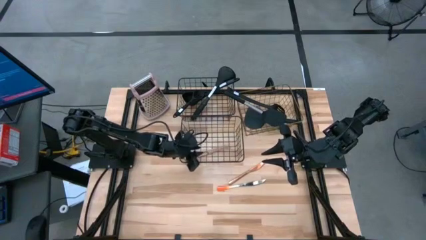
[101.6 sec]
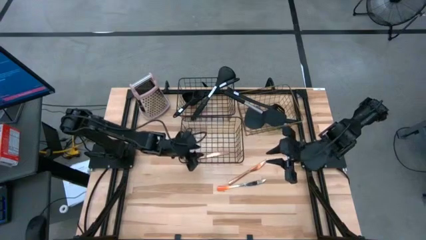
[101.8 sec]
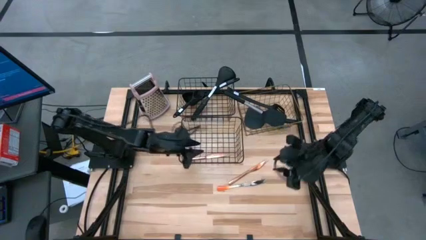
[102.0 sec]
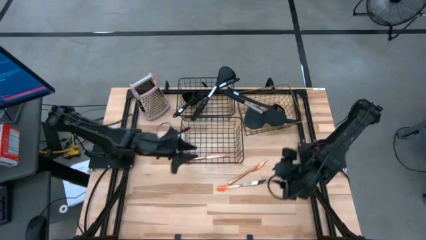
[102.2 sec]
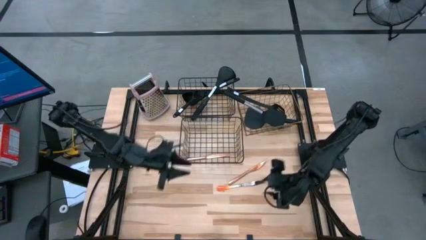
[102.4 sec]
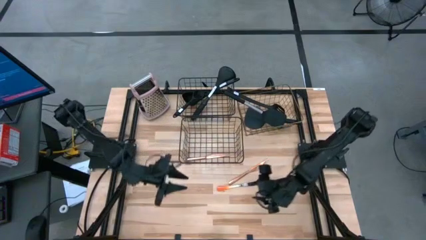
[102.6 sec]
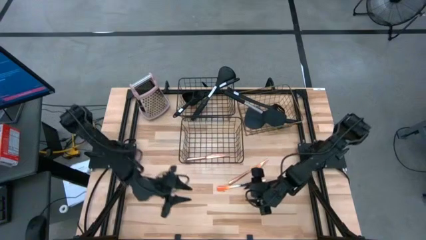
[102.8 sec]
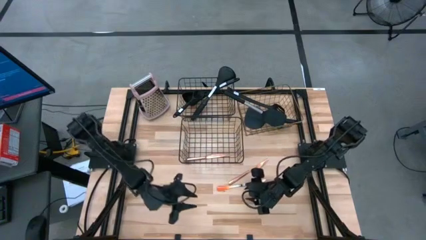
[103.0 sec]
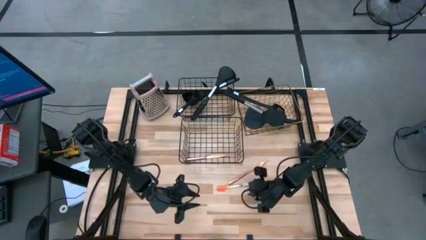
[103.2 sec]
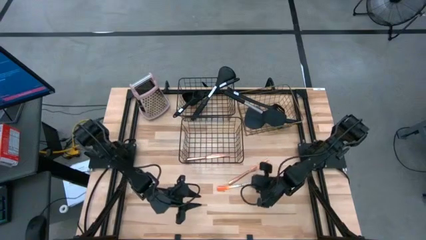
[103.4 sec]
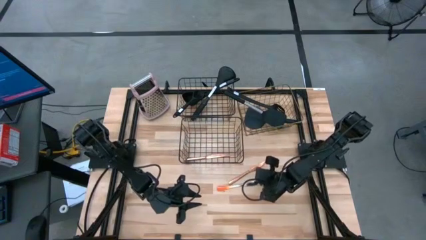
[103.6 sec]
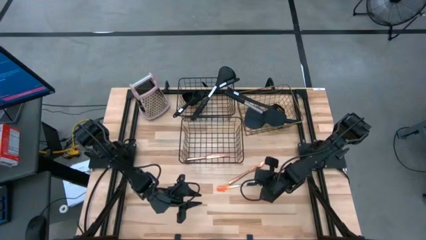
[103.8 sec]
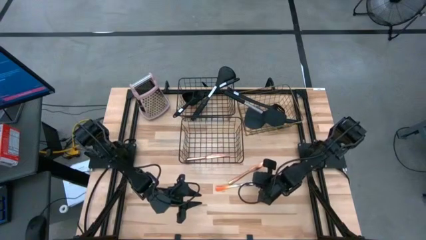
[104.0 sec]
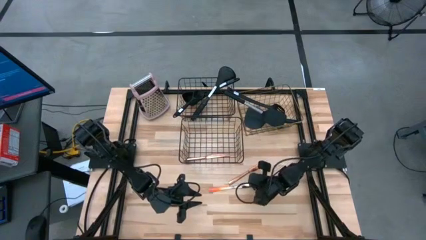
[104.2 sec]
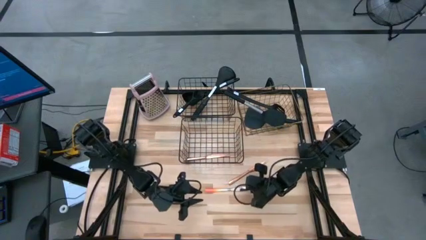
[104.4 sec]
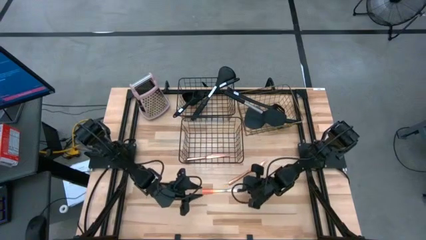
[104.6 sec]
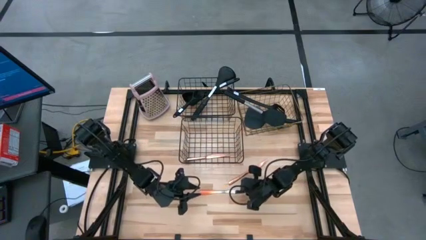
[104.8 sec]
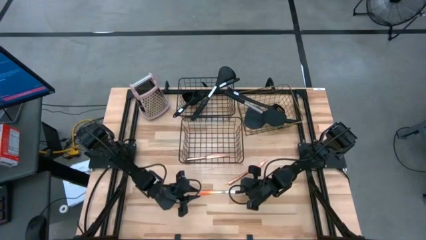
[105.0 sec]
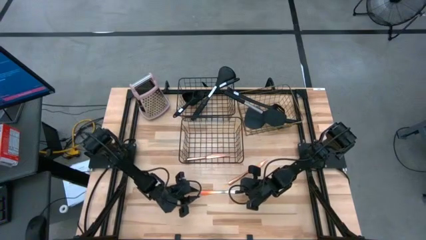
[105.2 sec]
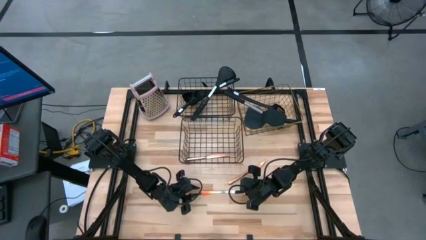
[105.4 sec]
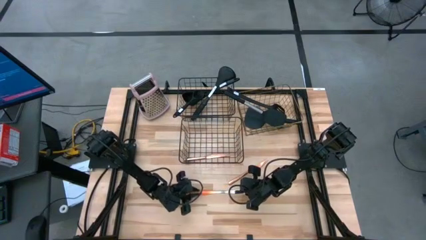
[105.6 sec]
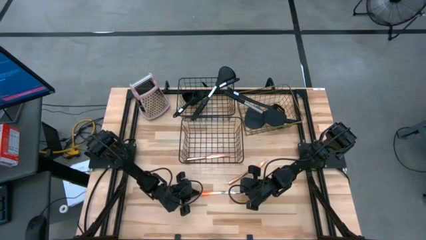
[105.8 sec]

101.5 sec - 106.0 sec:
Task: Pick & Place Kitchen Items
Put the table knife into the bottom wire basket

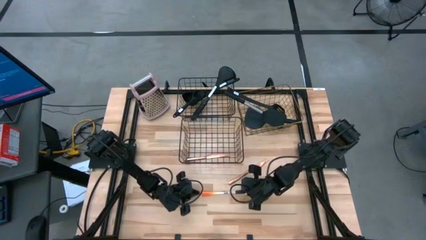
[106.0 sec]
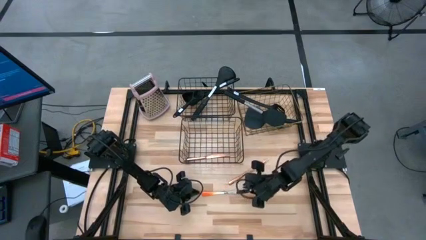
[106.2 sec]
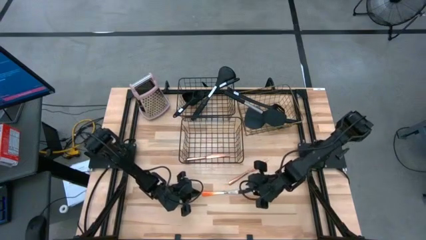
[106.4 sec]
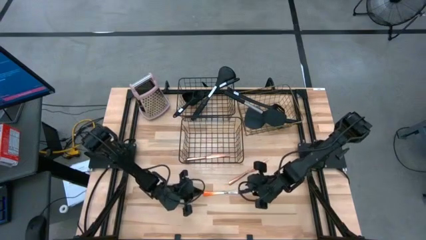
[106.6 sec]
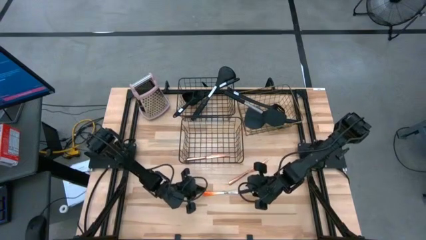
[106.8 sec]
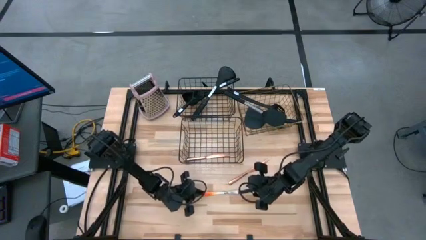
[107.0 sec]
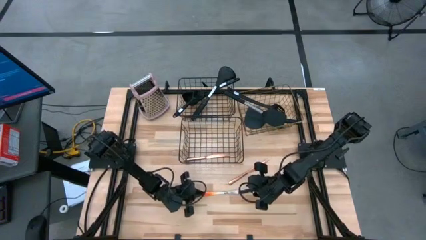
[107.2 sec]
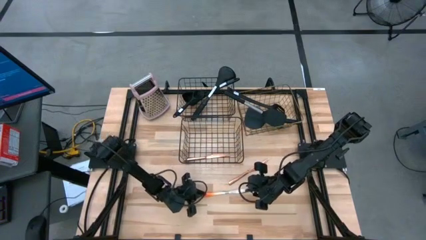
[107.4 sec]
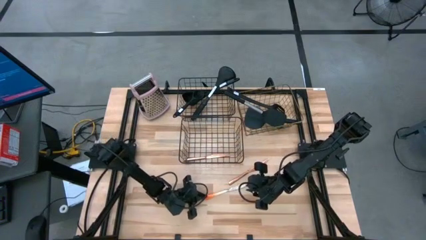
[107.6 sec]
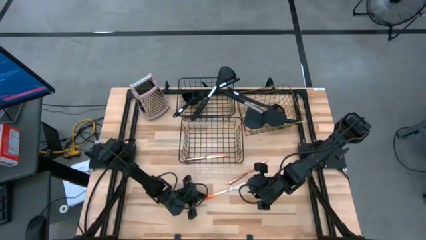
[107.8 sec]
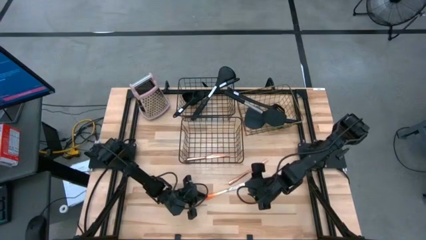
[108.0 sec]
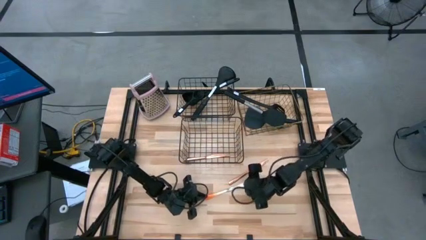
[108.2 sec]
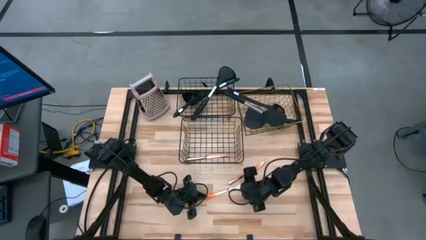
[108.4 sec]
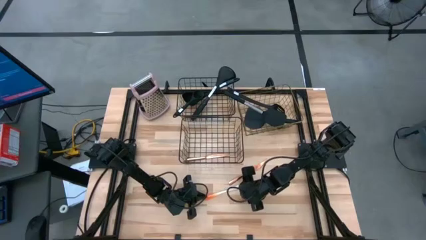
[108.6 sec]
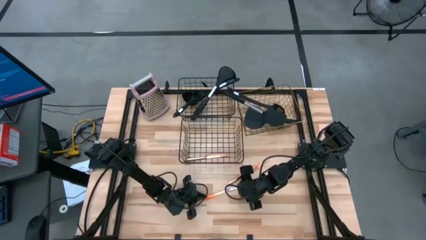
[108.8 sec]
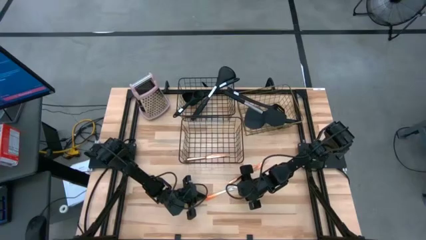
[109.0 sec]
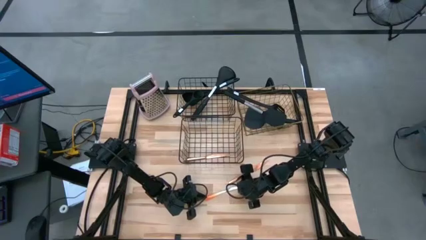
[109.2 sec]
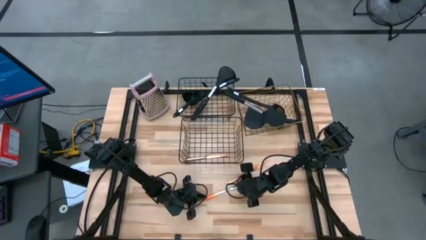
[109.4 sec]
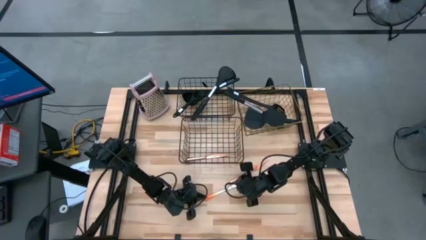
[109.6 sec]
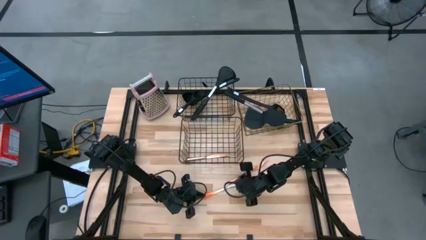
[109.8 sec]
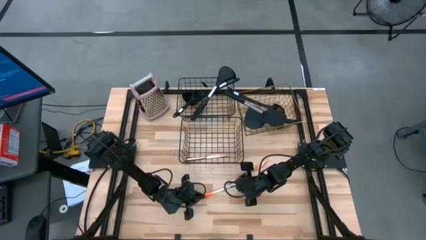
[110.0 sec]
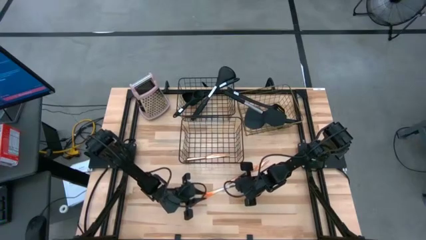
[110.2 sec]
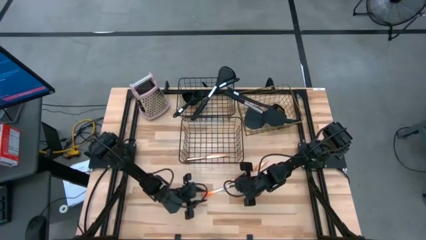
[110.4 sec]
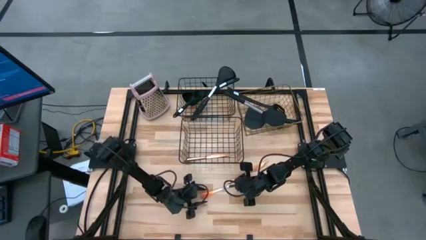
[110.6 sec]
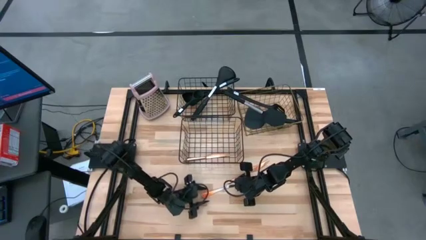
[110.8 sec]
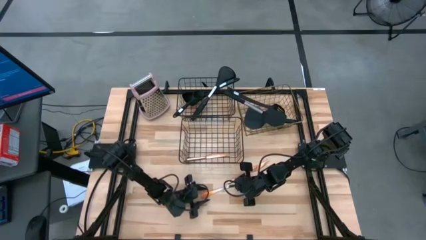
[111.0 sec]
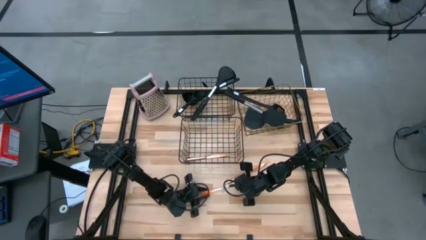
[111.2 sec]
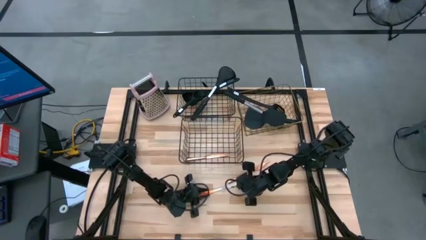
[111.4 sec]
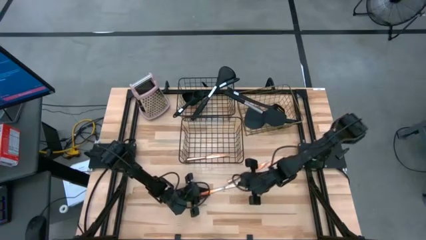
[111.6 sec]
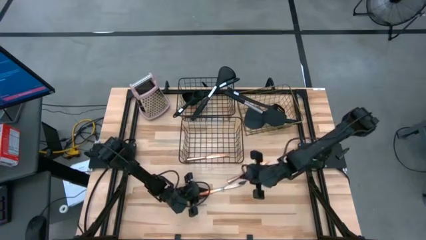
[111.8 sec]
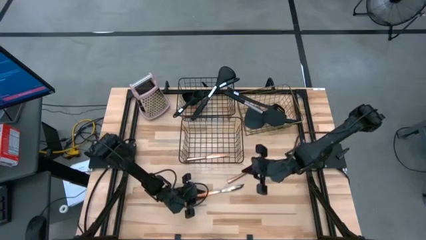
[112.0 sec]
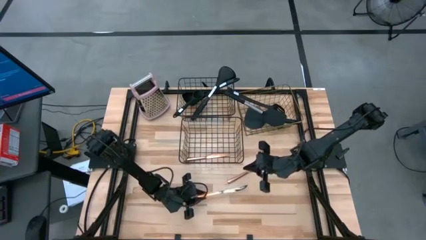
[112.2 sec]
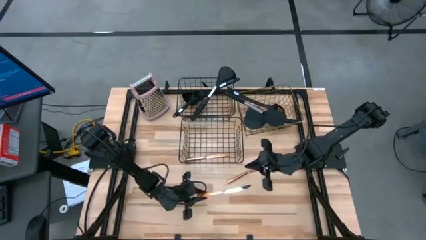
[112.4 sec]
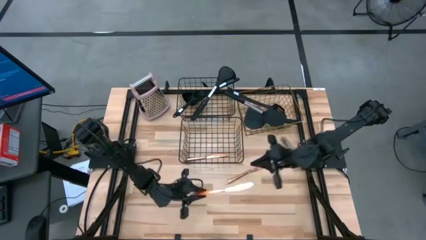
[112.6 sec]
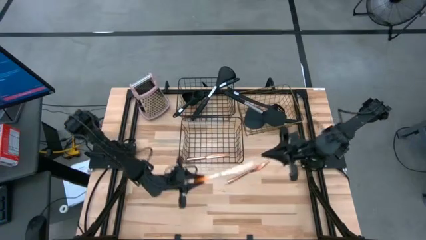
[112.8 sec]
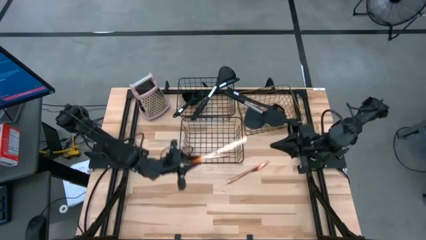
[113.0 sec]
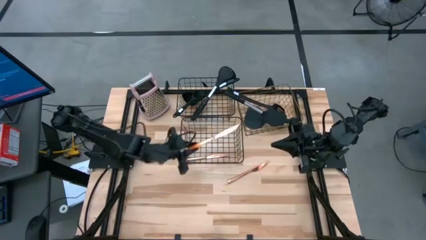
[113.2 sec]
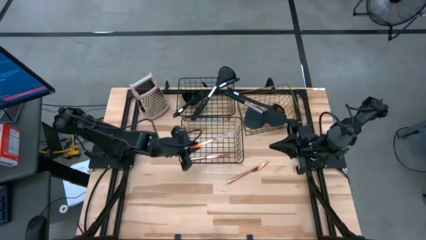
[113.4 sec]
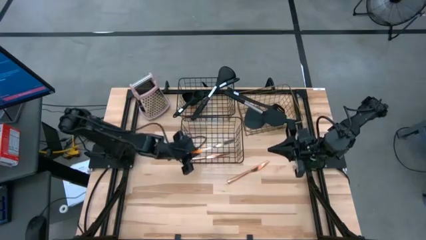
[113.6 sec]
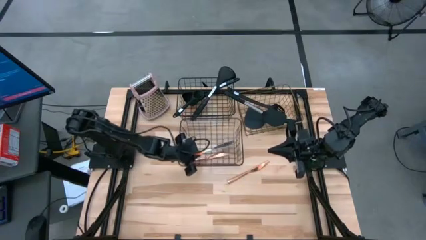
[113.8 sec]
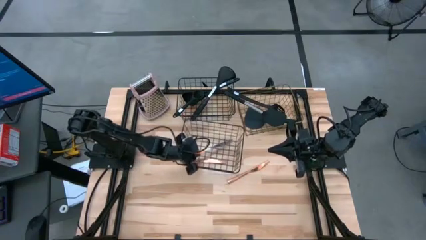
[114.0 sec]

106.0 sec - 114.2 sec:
Put the table knife into the bottom wire basket

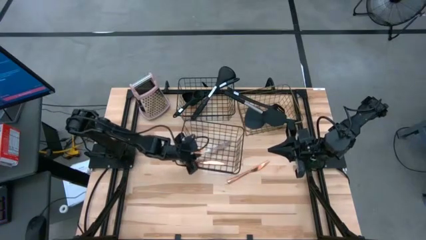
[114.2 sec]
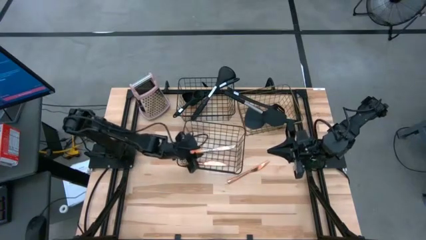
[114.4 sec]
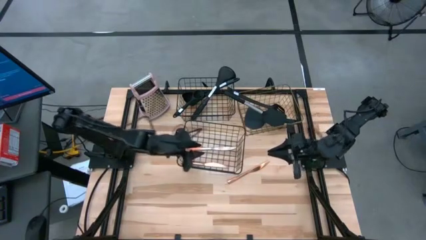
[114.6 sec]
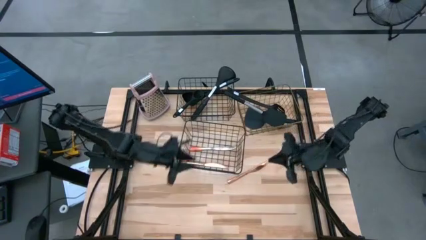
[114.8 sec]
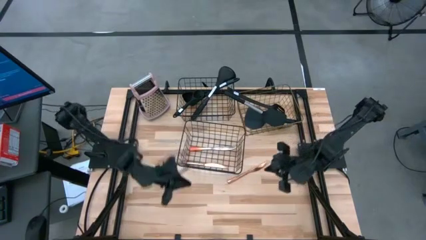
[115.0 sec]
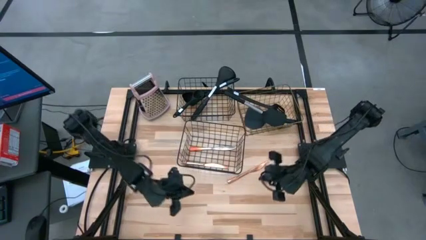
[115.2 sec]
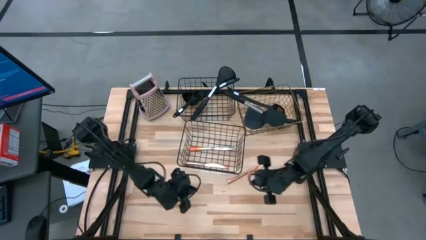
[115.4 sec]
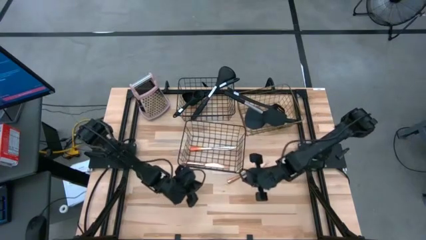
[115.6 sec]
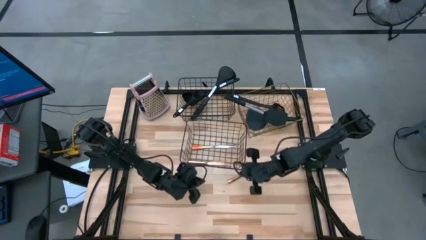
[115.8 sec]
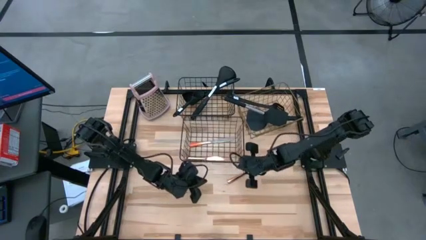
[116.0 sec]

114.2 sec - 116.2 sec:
Adjust the bottom wire basket on the table

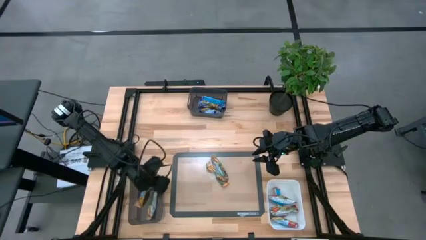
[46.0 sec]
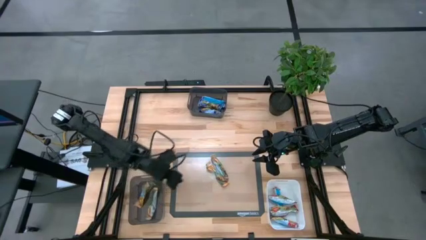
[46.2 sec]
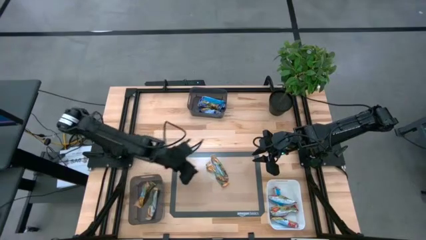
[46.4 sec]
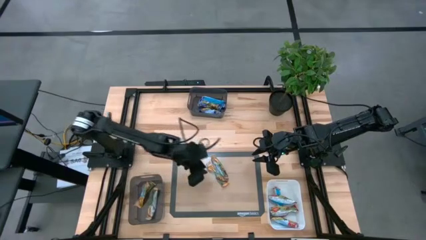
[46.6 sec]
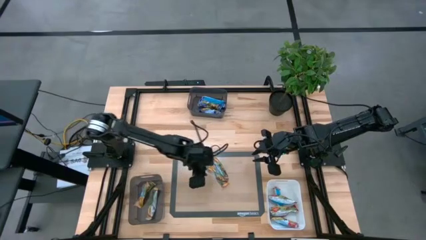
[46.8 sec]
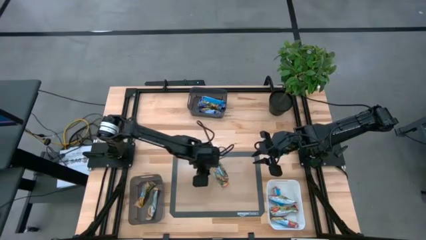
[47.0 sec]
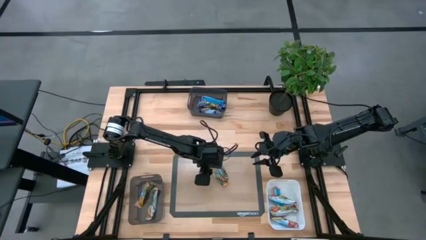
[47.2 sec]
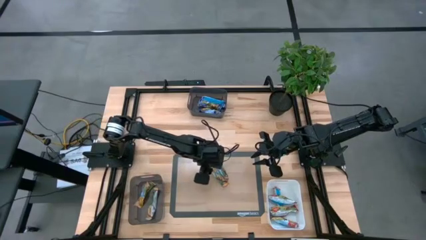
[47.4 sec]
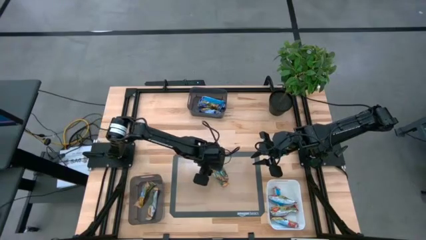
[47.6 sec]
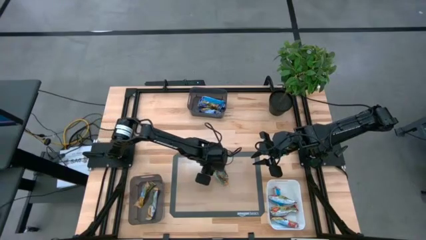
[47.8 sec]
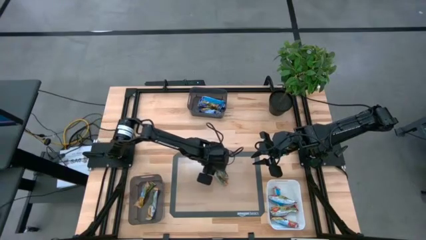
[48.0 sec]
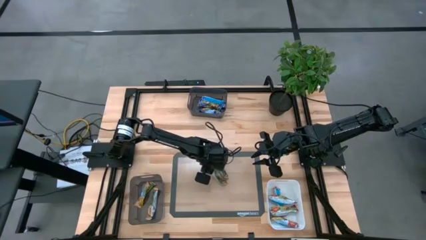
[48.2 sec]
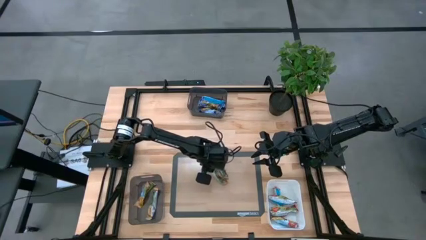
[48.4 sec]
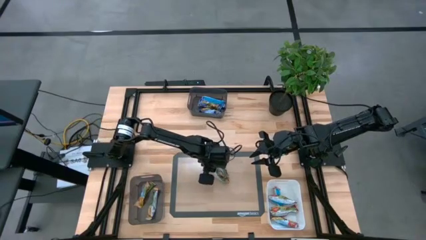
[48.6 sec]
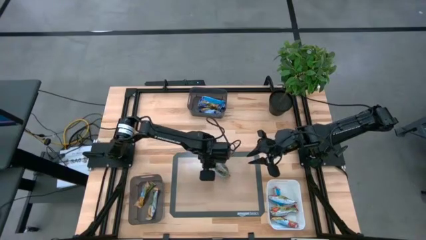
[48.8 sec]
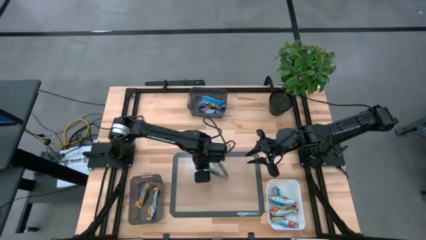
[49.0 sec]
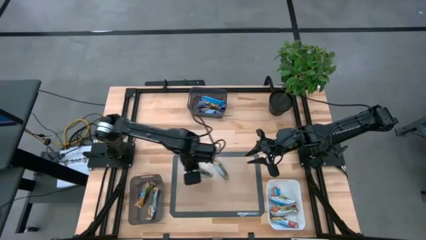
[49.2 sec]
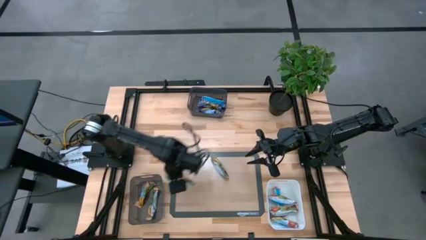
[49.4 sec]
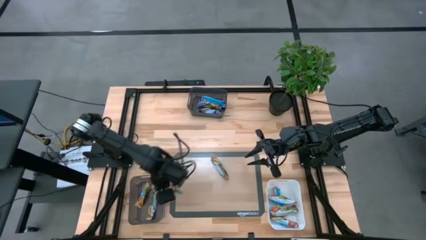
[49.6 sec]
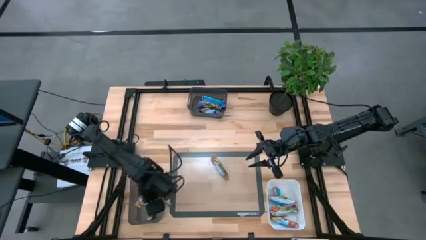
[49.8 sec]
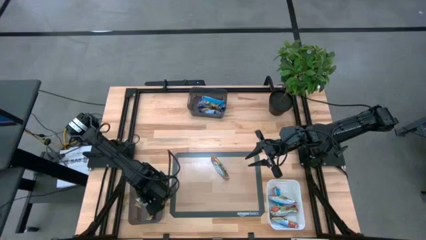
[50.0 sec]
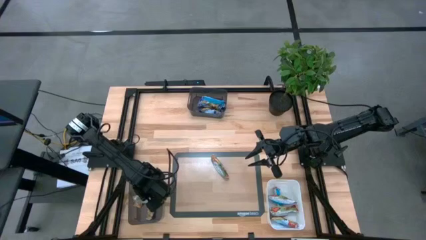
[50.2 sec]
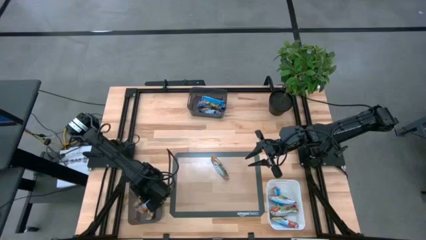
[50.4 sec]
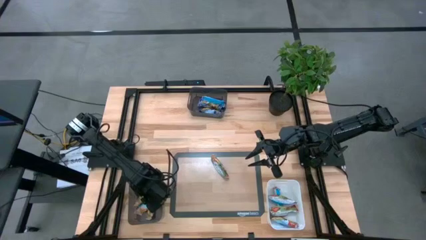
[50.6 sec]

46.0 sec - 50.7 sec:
Task: Pick and place Granola Bars by type
Put the left orange snack bar into the bottom black transparent bin
